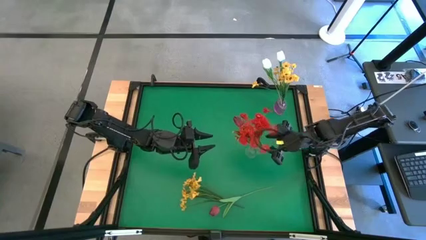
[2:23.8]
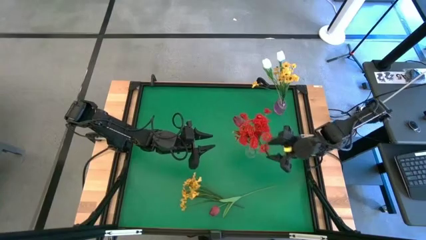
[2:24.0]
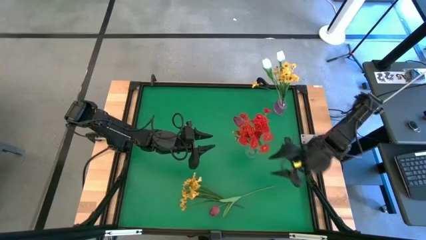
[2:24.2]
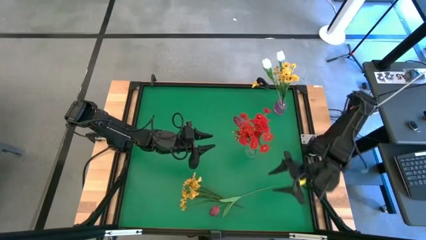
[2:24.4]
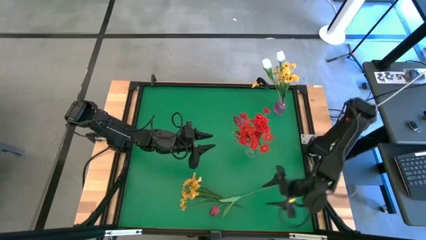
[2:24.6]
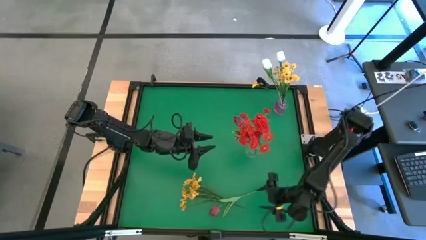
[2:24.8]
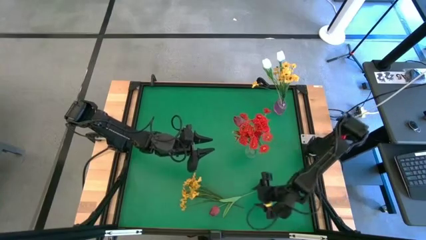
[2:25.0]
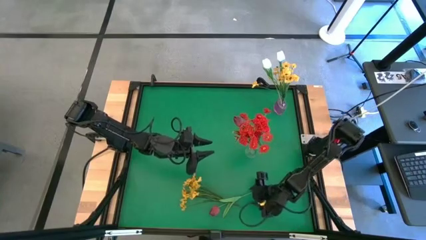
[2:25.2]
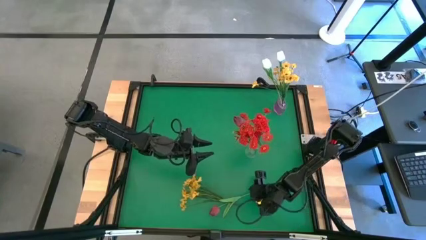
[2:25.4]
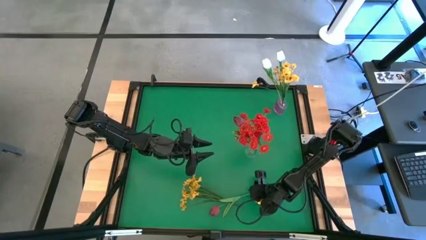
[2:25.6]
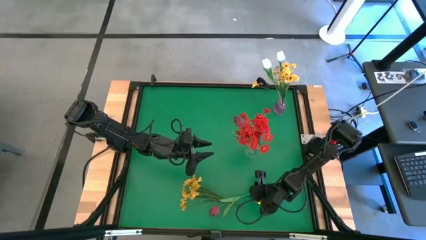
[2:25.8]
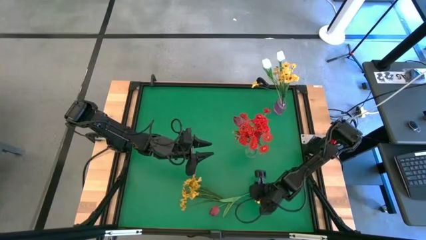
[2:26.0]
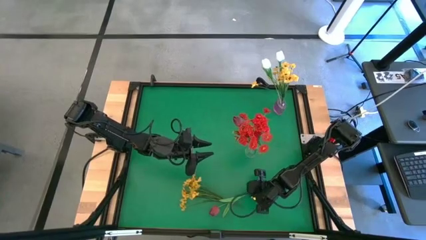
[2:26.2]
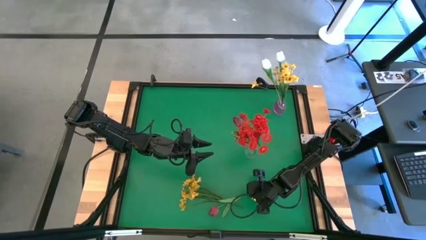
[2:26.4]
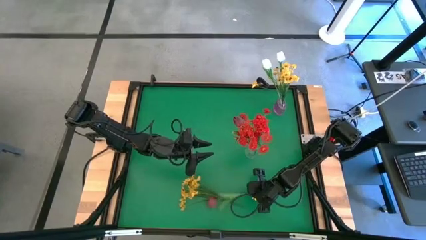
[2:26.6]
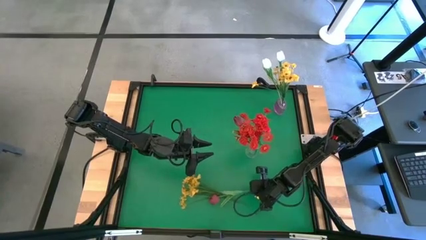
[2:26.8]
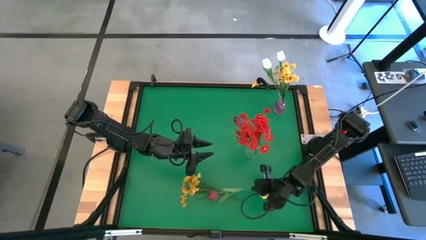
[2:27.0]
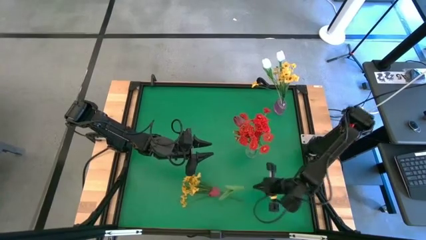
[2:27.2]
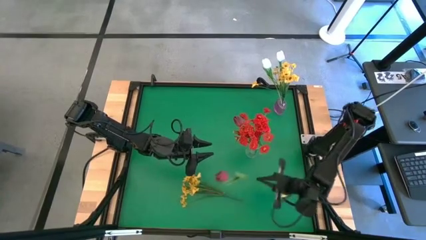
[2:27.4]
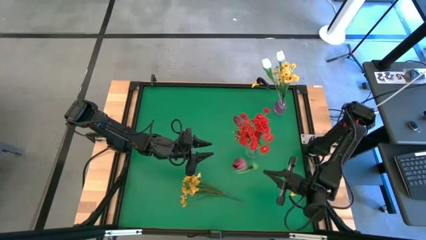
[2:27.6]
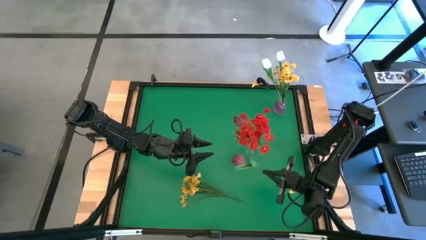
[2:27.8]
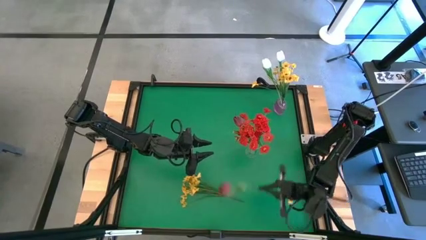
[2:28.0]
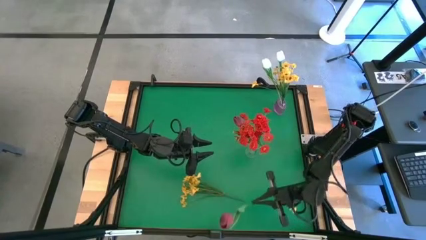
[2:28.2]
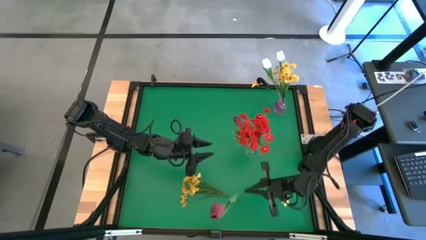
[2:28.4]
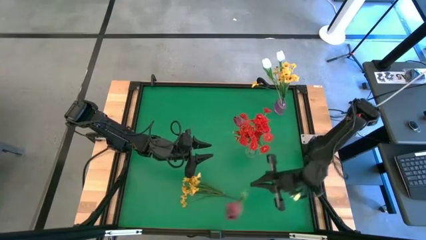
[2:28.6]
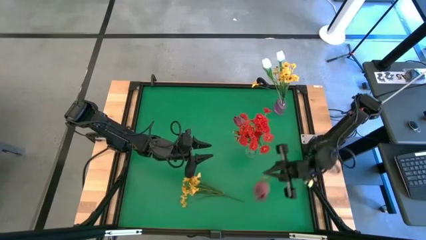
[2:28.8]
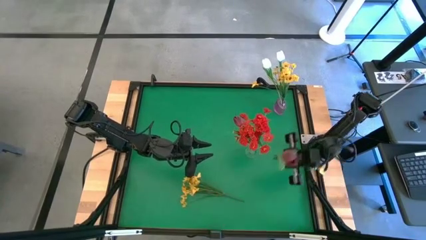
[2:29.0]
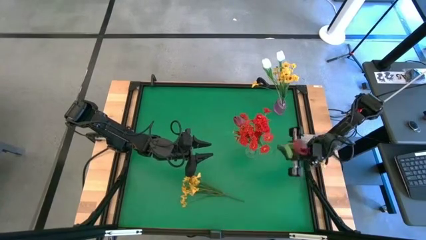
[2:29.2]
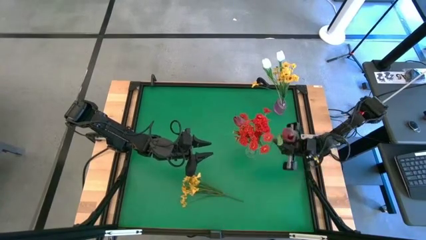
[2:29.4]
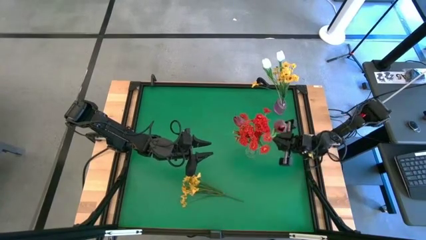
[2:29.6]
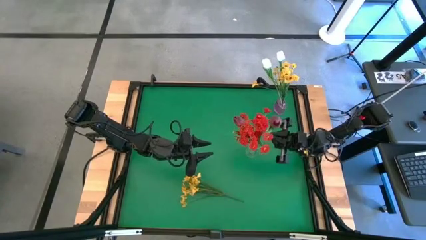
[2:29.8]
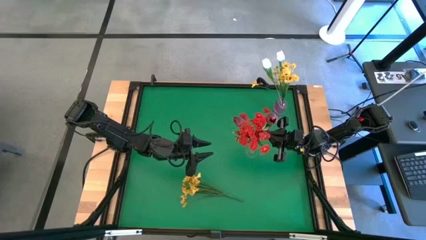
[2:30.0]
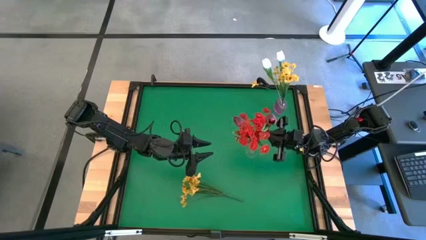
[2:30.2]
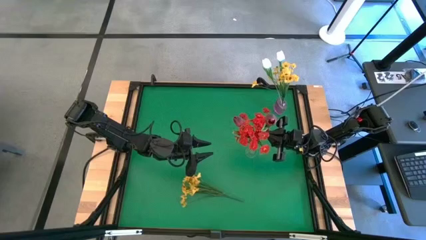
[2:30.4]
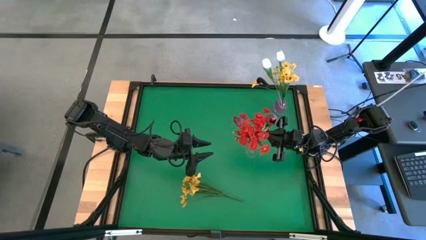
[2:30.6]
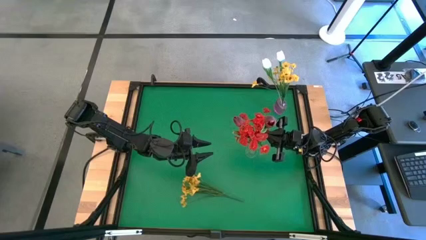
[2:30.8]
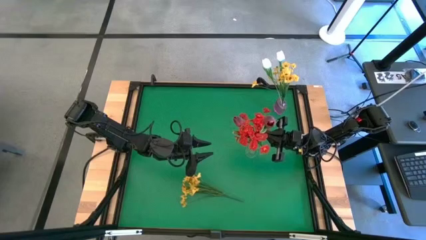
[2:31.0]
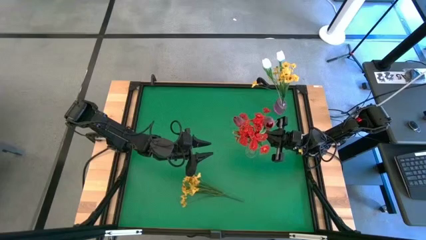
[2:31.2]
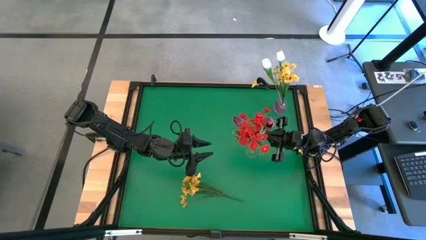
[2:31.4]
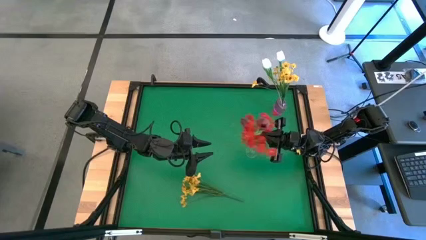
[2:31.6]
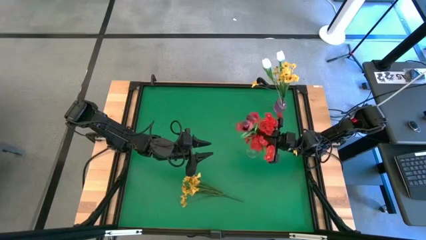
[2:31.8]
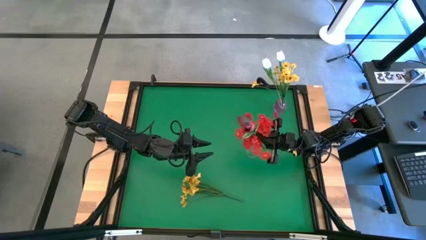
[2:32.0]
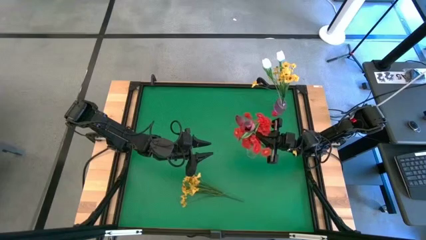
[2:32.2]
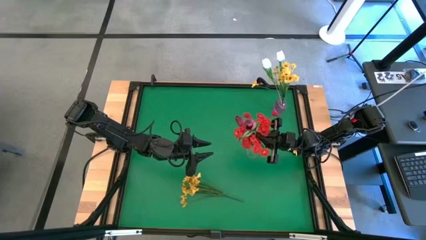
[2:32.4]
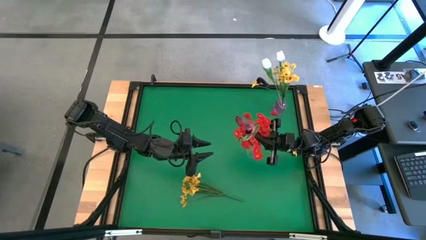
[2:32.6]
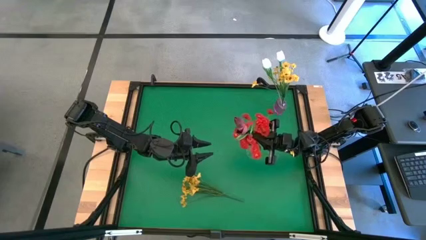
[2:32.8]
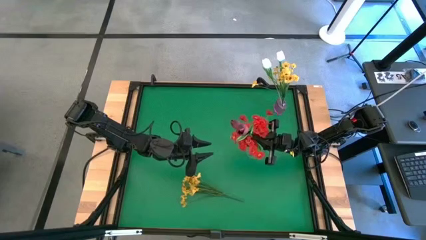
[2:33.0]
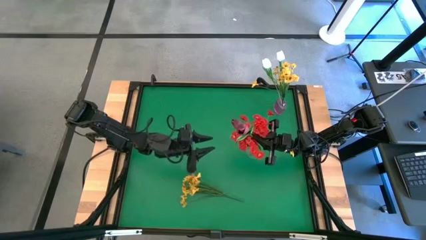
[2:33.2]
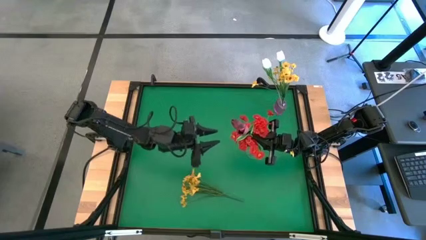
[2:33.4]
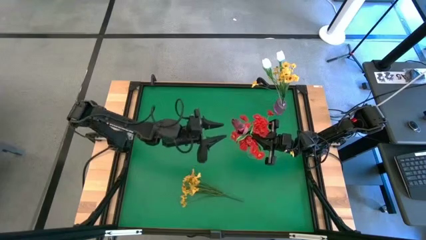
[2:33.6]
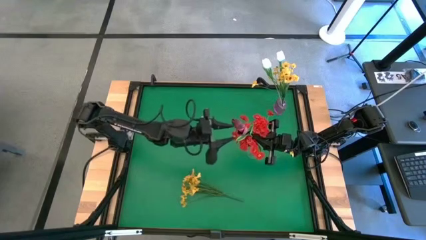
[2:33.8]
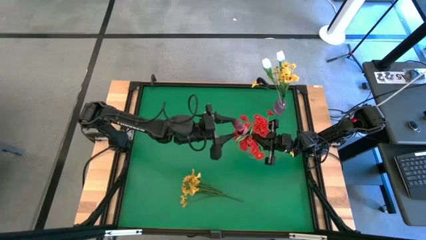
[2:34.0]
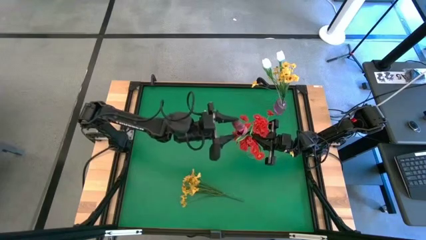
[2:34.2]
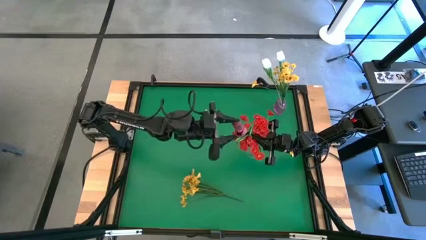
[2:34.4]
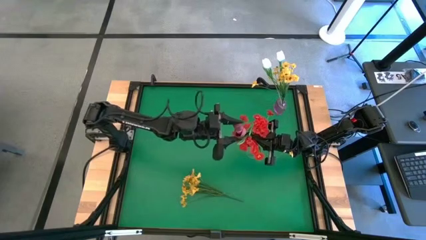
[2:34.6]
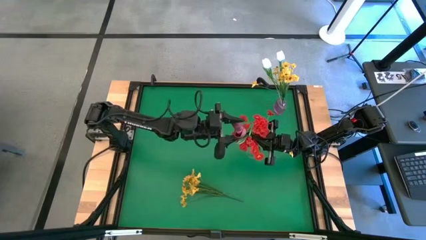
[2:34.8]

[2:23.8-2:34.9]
Task: Sort flowers into vase by color
Put the red tulip into the transparent vase

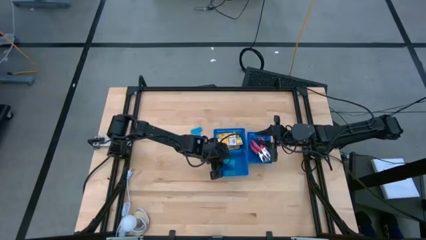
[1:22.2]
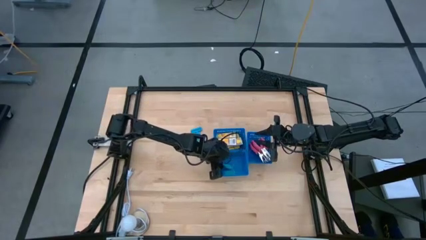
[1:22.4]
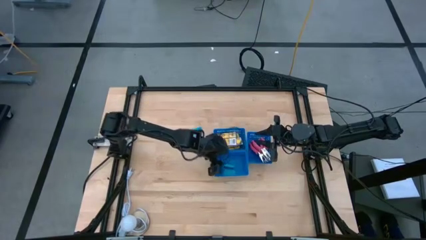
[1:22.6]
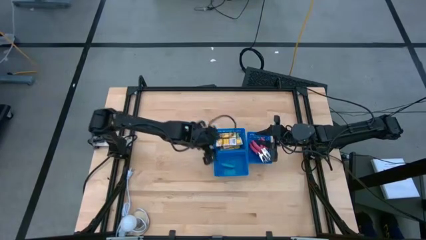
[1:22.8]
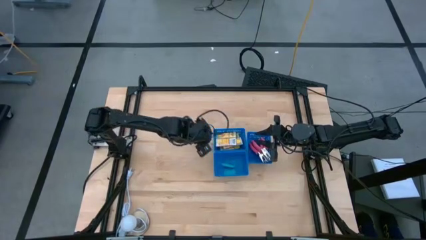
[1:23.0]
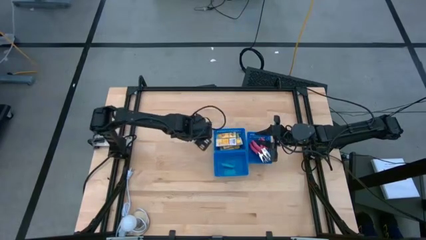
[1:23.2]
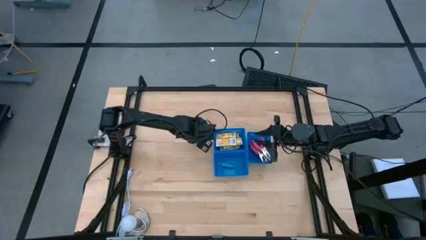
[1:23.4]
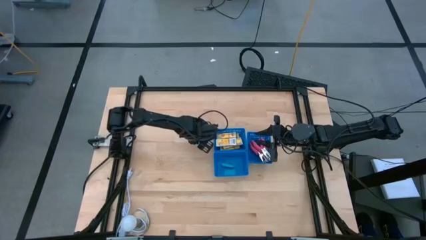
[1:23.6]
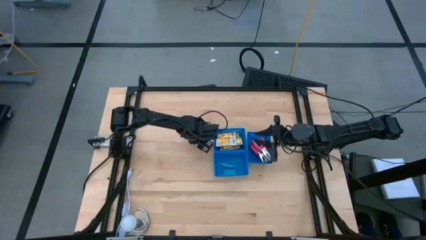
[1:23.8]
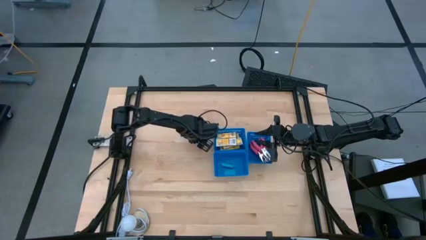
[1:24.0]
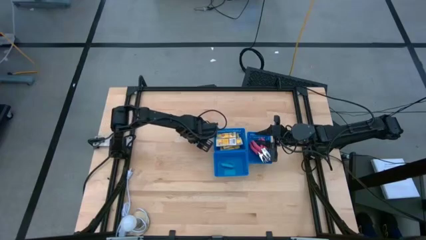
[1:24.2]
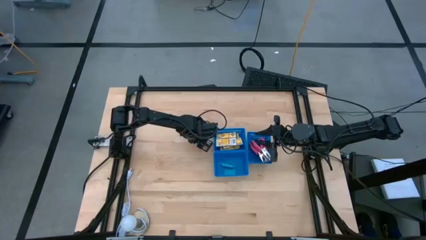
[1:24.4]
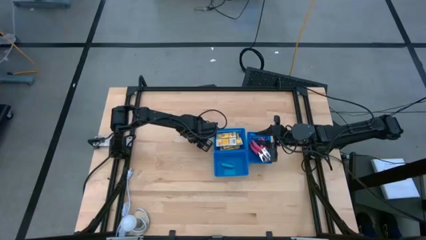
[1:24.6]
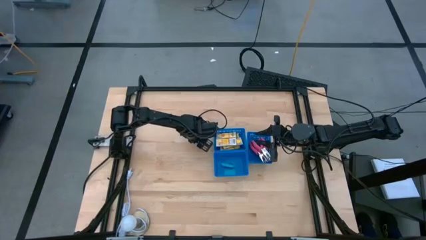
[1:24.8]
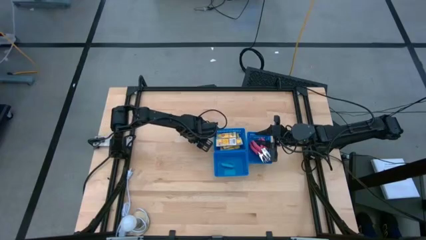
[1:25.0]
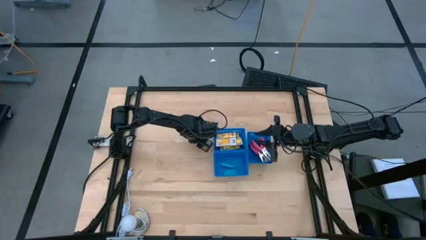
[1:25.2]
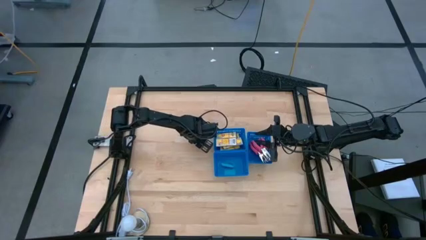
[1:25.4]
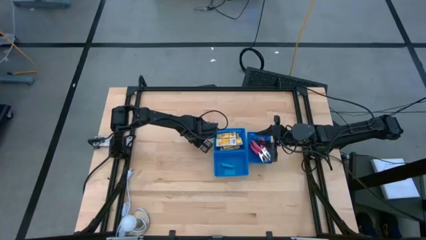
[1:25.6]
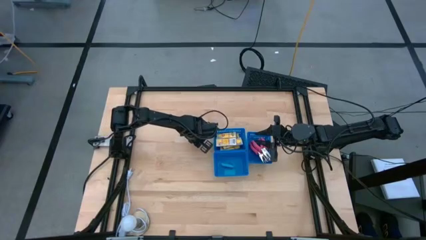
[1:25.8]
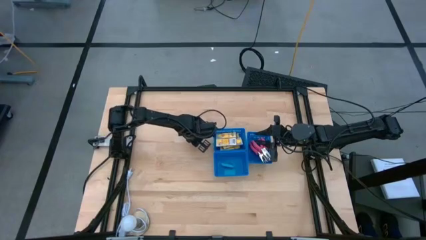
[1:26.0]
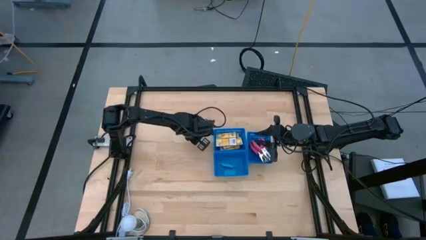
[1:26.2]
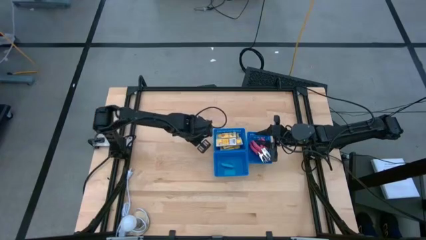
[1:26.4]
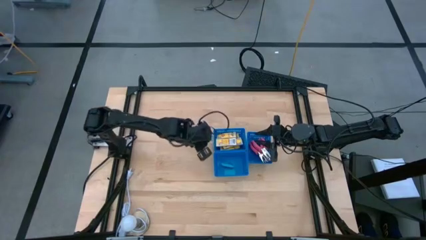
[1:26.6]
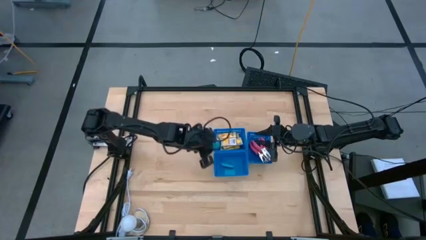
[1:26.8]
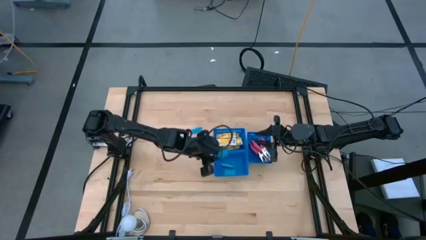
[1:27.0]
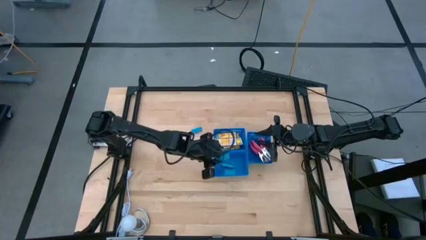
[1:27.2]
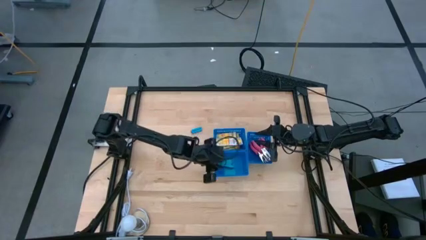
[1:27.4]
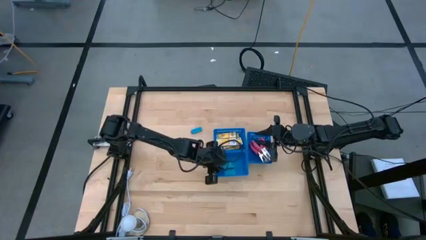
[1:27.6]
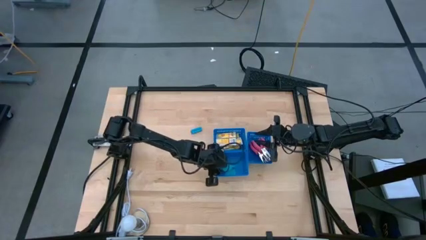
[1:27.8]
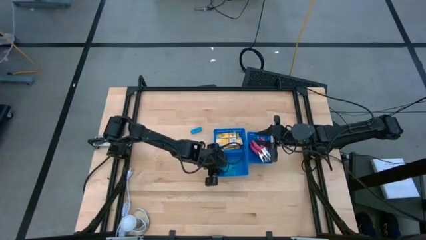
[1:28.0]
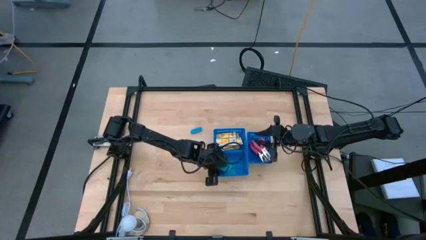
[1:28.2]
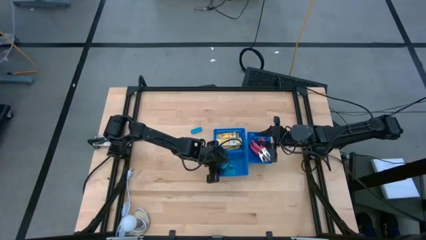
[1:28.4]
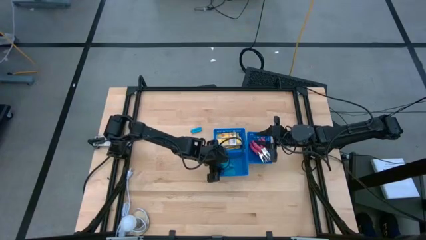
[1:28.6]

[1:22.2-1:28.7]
Task: Pick & Place School Supplies
Put the bottom blue eraser into the bottom horizontal blue bin
